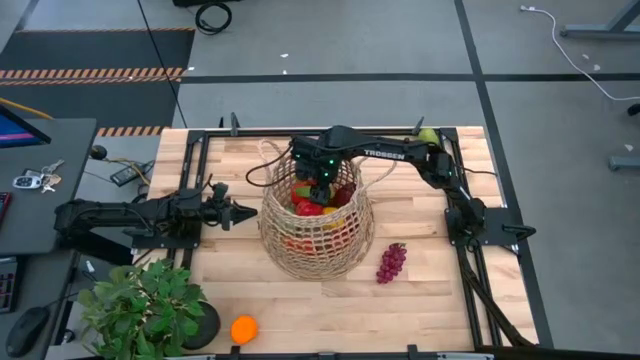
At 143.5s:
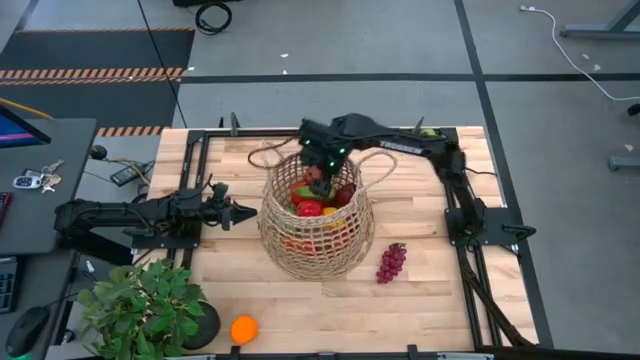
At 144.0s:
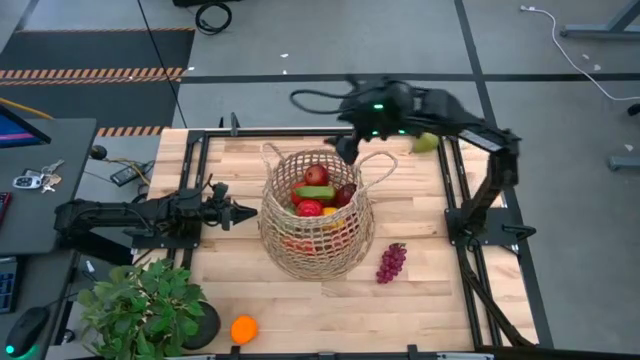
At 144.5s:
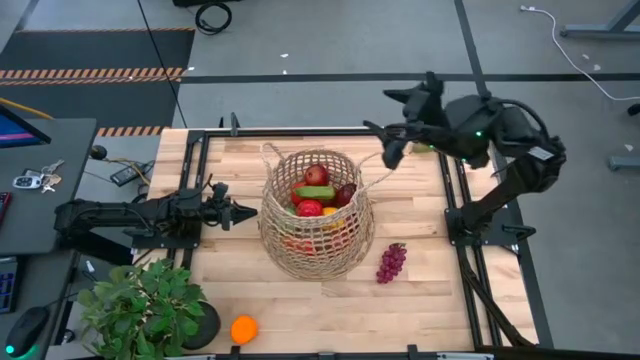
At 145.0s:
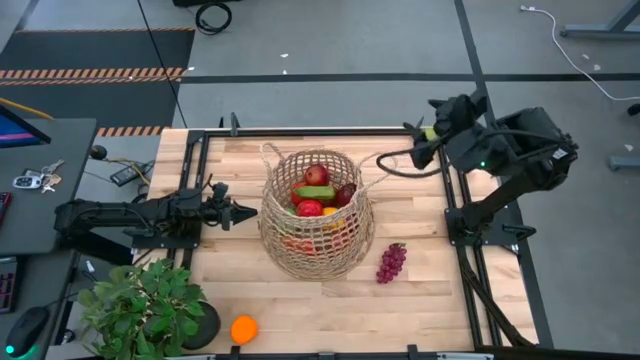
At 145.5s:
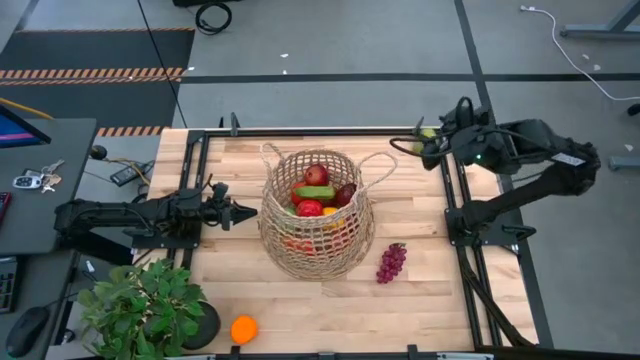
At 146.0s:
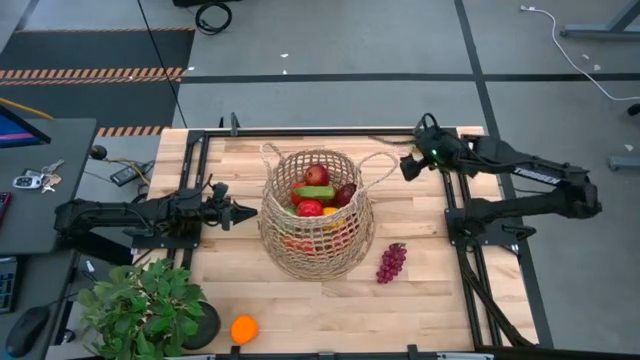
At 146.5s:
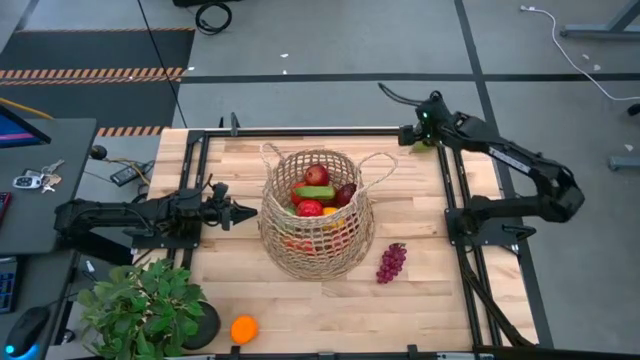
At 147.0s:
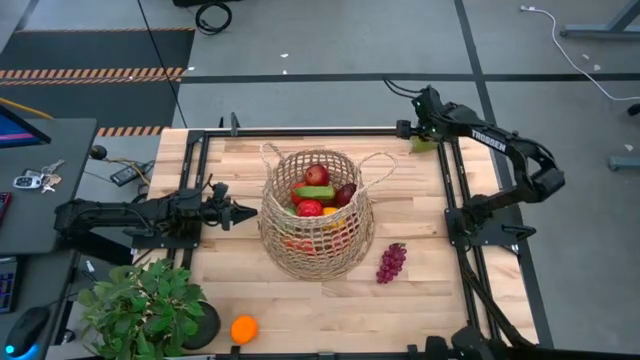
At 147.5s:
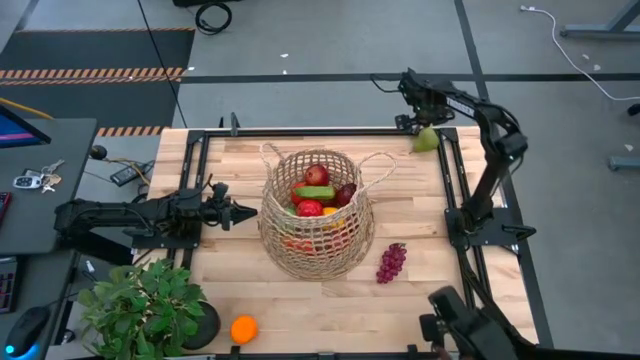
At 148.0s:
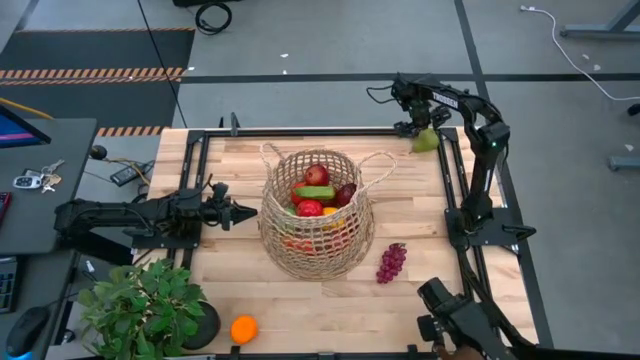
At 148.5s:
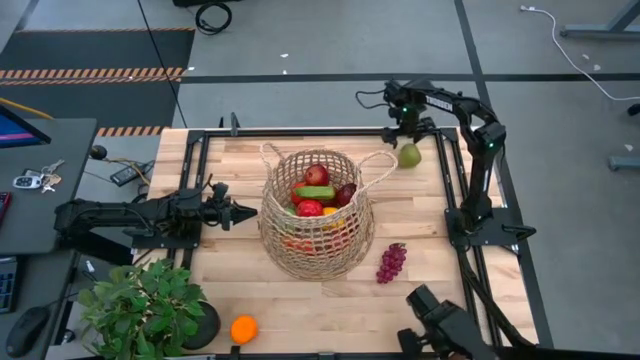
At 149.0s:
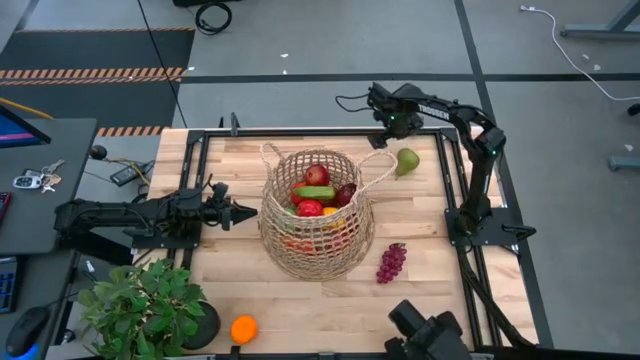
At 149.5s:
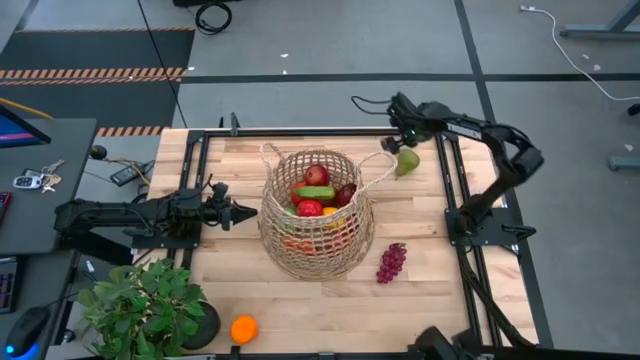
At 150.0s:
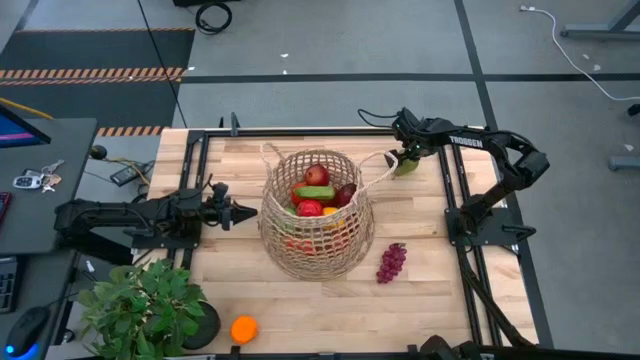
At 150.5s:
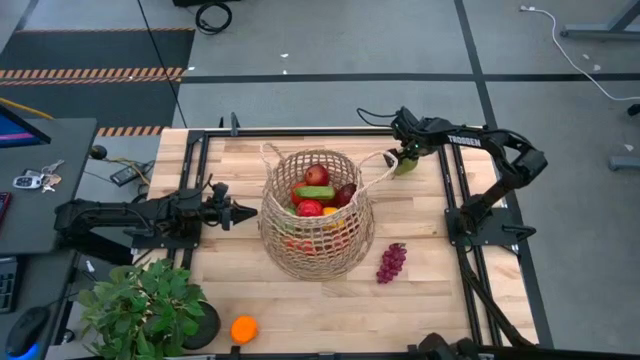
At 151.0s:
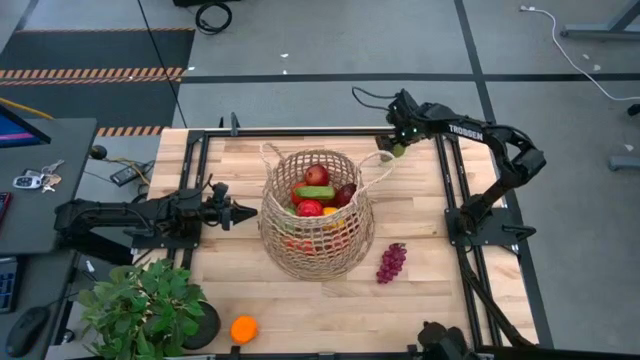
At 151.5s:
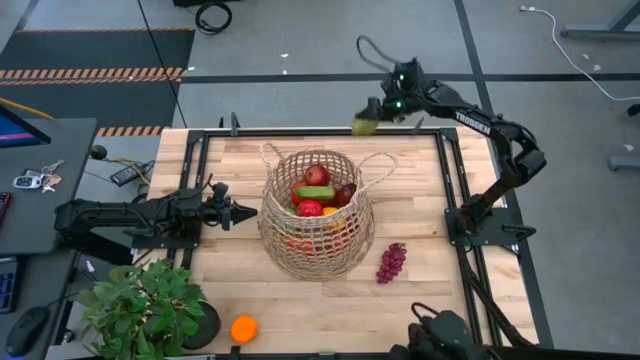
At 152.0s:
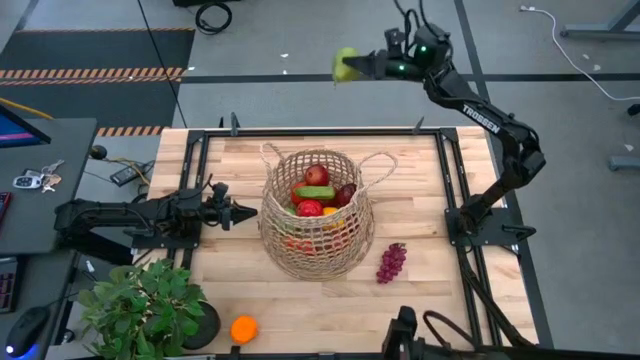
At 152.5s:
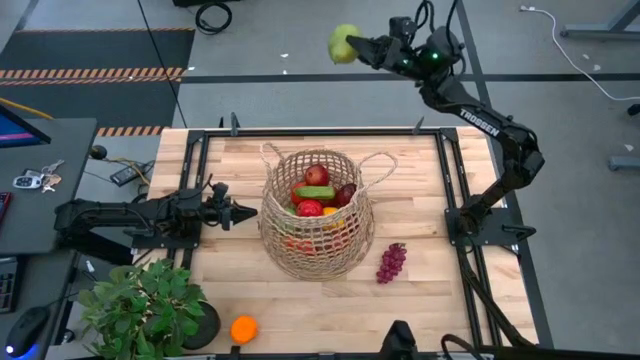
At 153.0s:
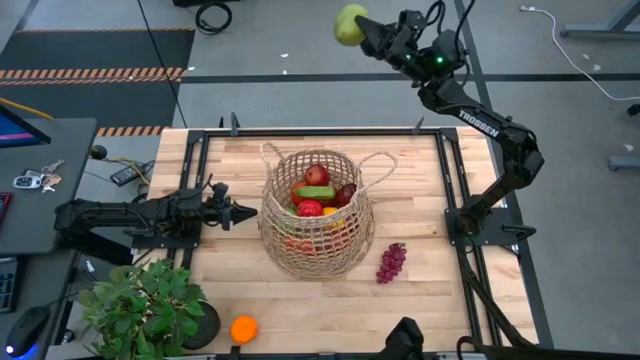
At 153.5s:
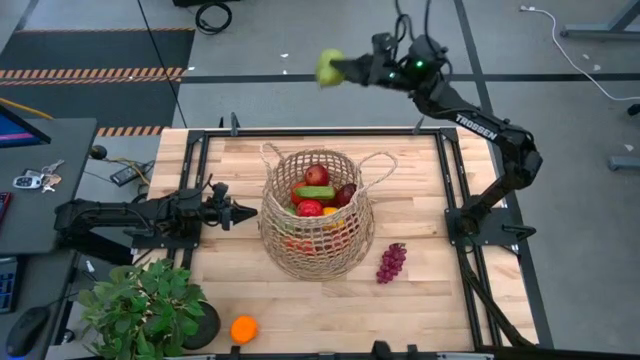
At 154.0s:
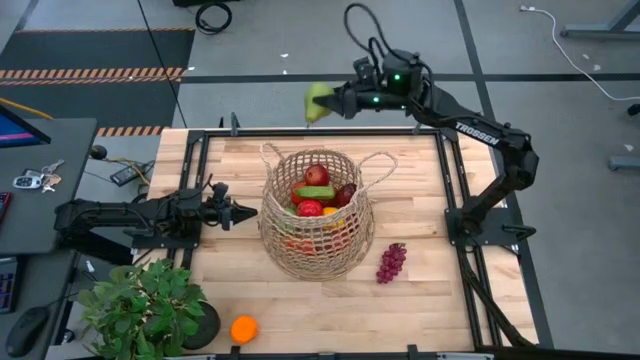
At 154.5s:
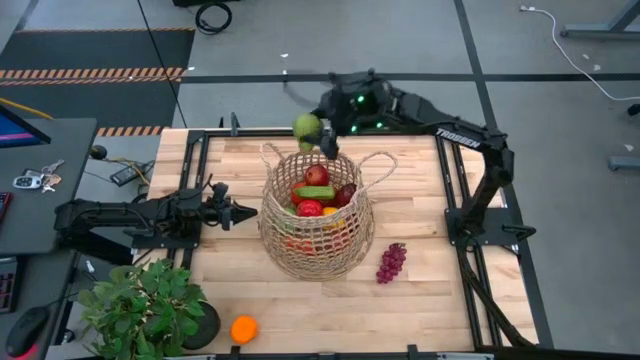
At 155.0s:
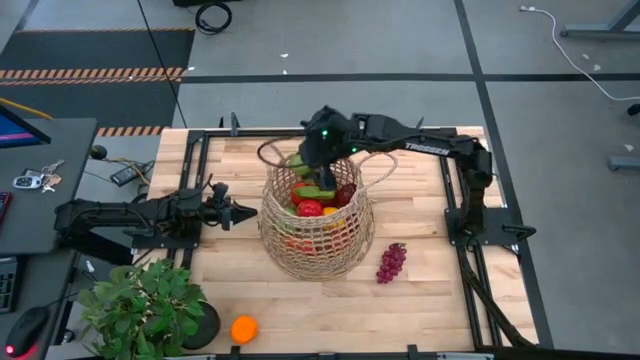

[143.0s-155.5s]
Task: Build produce basket
Put the green pear into the basket

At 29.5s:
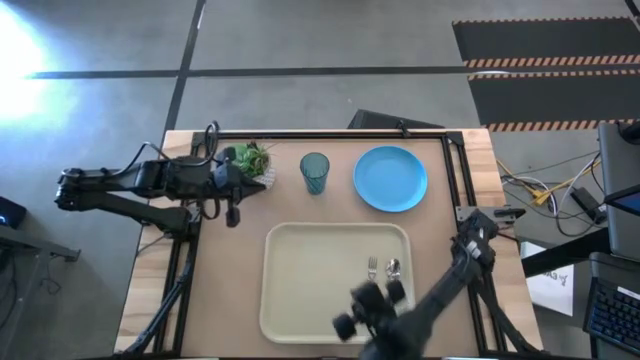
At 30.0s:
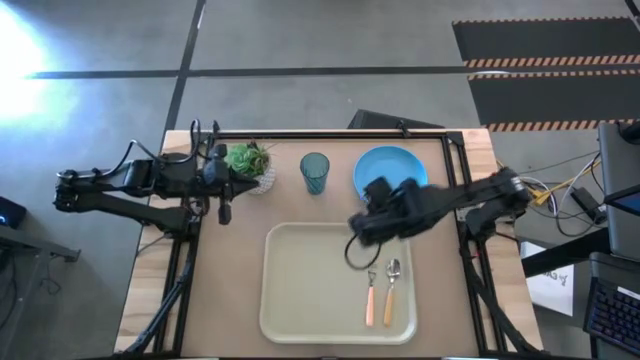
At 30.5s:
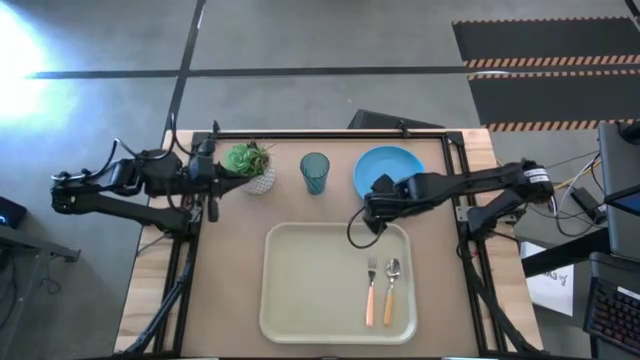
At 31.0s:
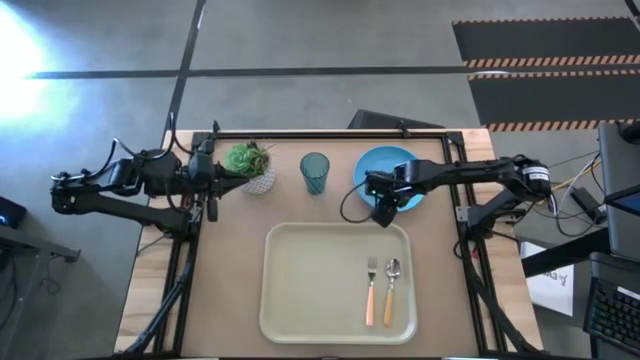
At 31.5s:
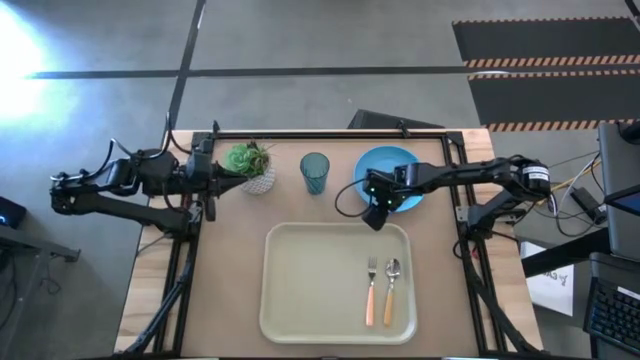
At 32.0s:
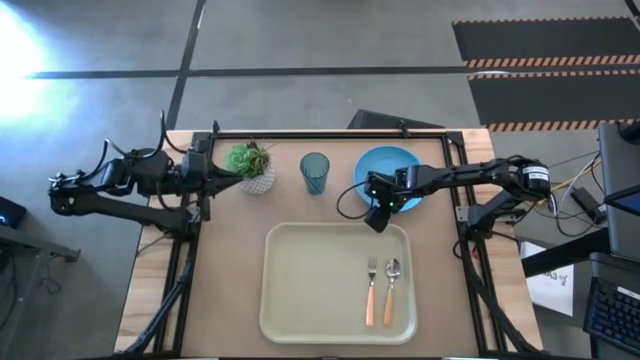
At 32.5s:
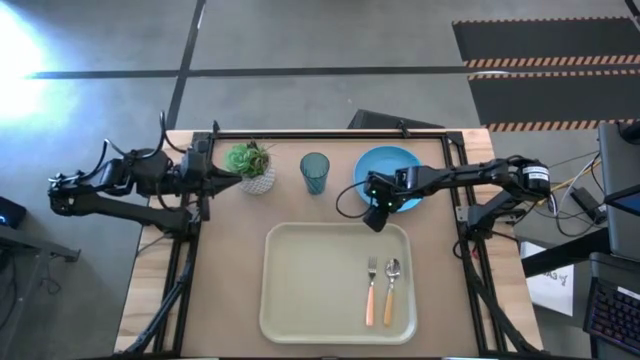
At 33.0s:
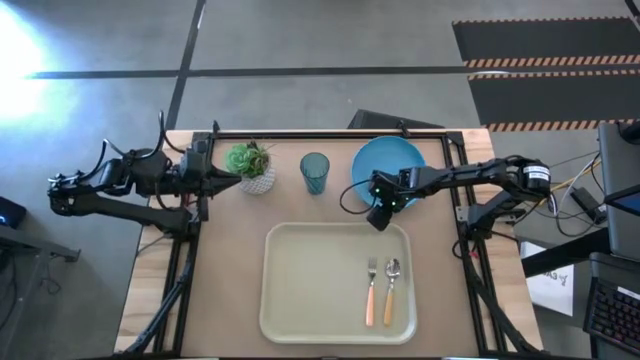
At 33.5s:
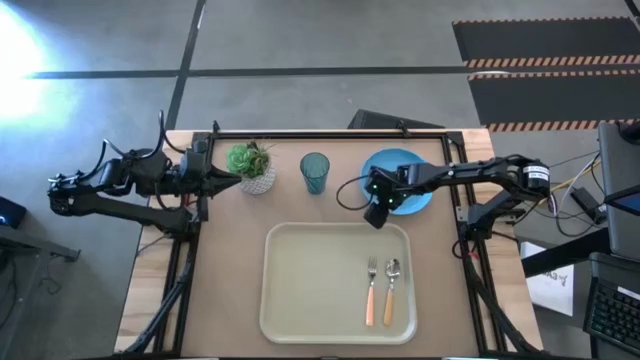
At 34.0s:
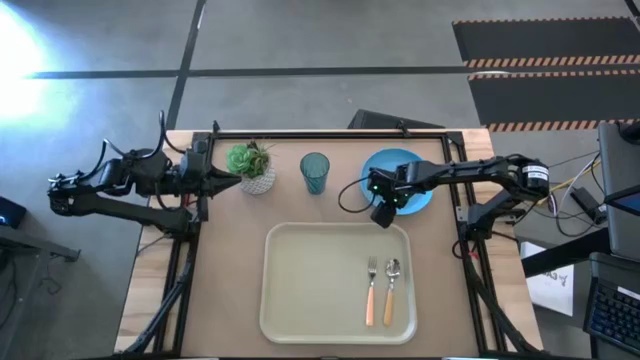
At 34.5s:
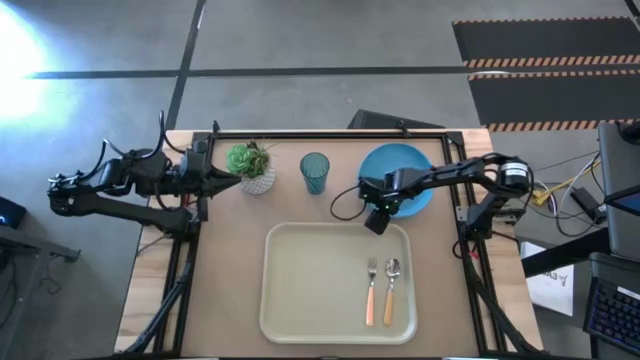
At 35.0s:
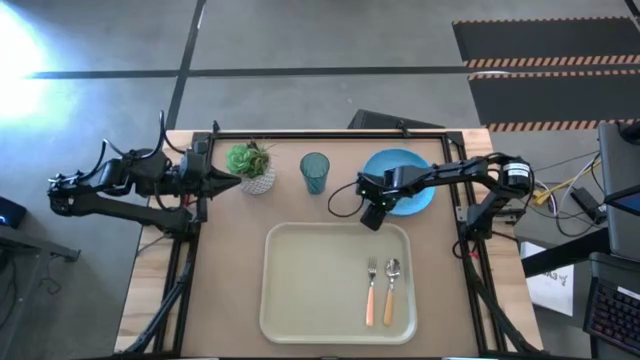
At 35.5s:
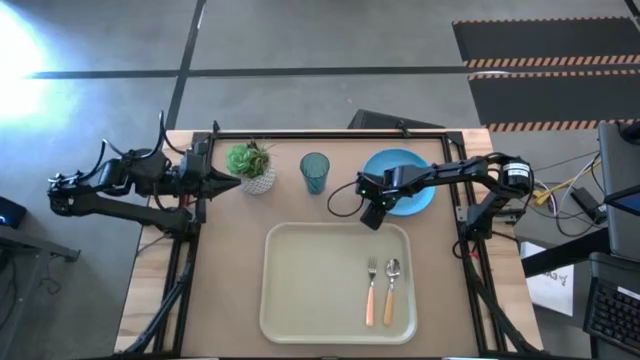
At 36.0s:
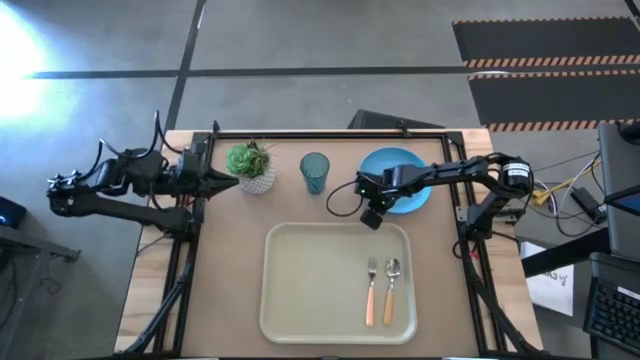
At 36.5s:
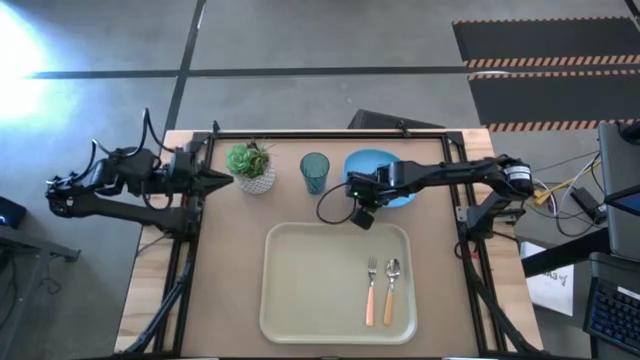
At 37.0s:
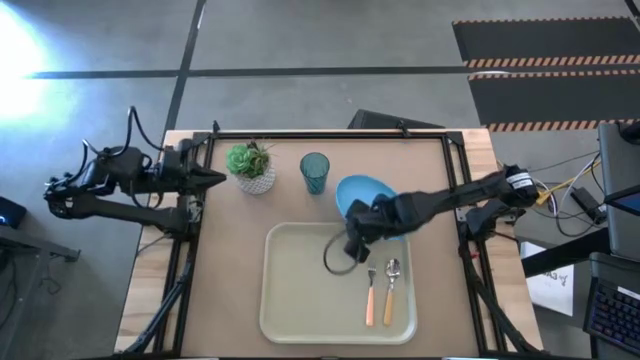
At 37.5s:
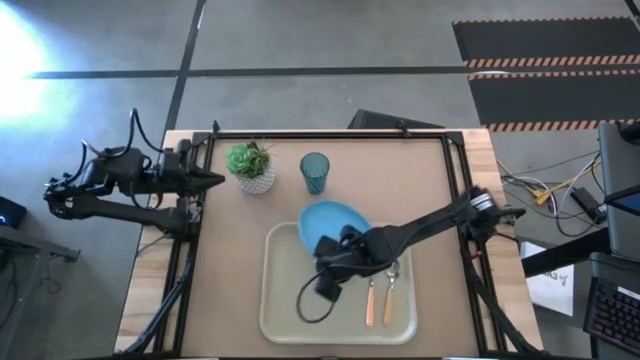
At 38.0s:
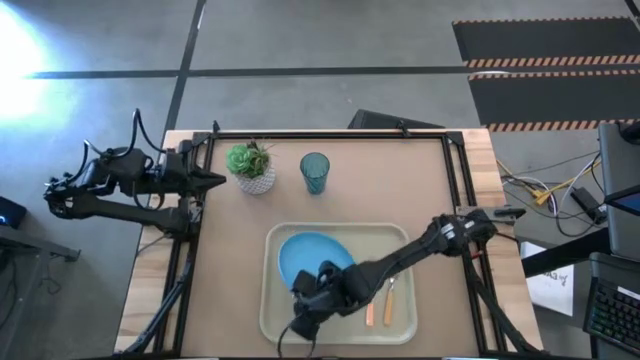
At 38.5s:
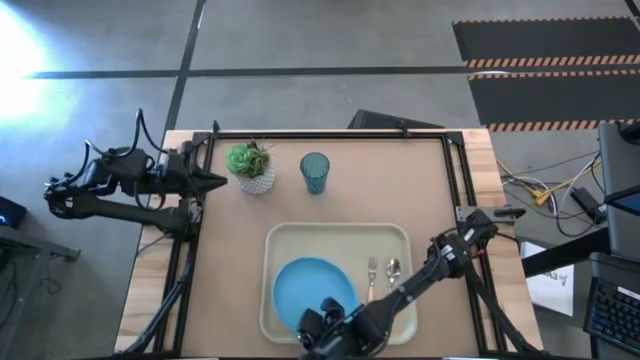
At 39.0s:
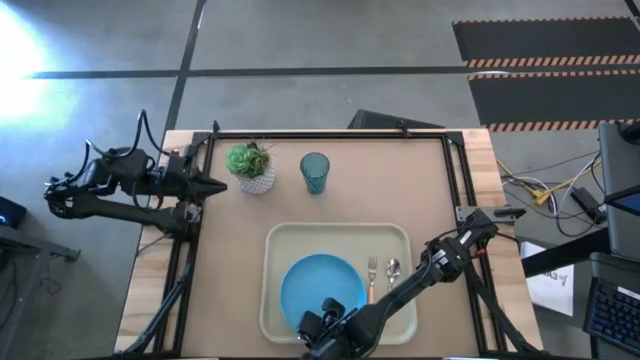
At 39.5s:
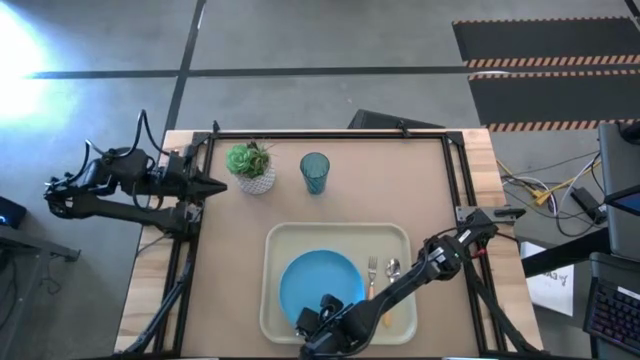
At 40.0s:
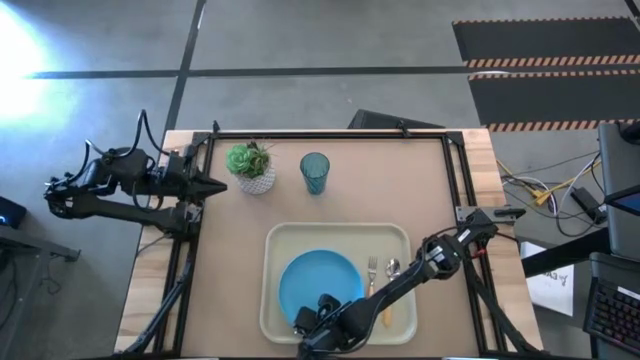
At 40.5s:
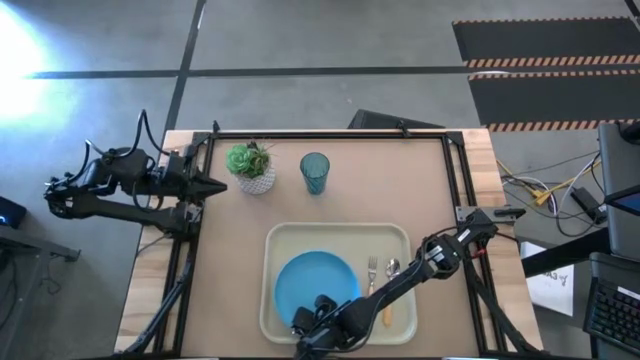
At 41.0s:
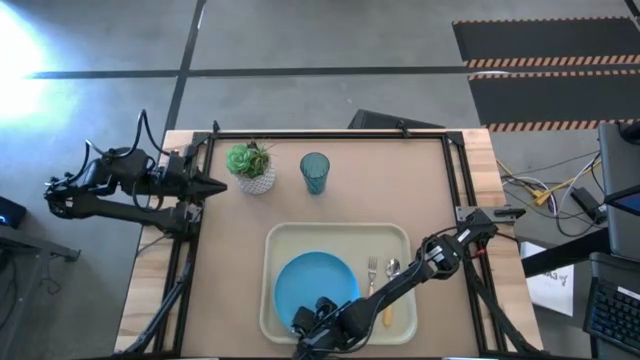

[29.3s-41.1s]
Task: Pick and place plate/cup/fork/spoon on tray
Put the blue plate on the gray tray to the left of the light pink fork
